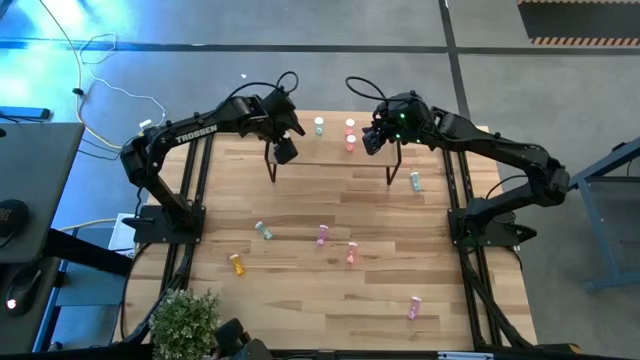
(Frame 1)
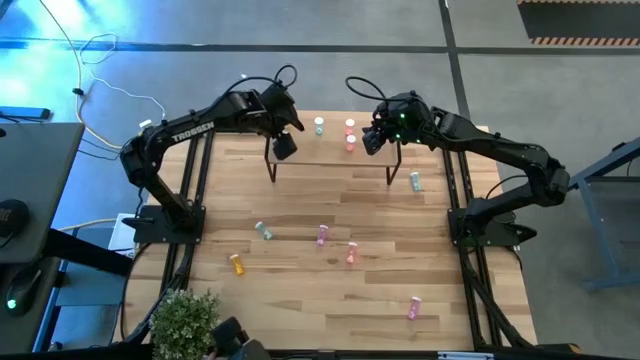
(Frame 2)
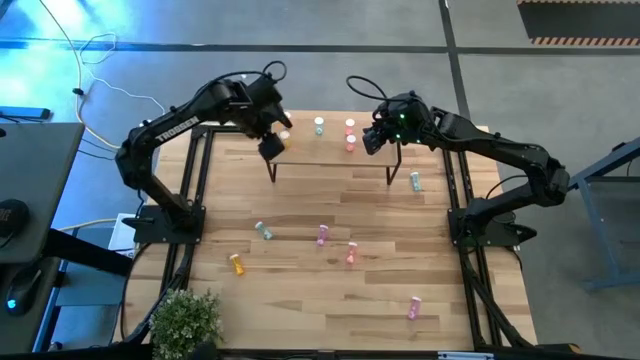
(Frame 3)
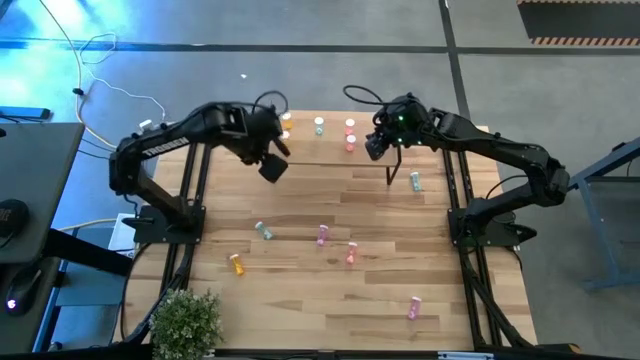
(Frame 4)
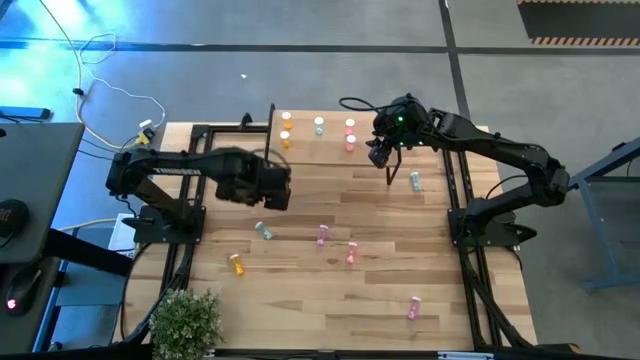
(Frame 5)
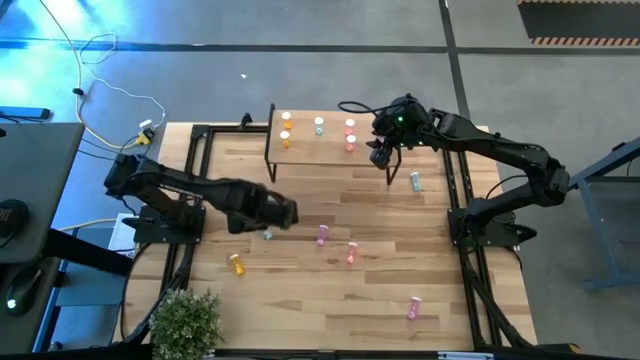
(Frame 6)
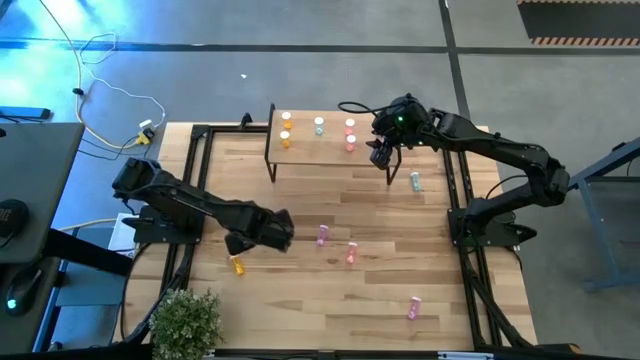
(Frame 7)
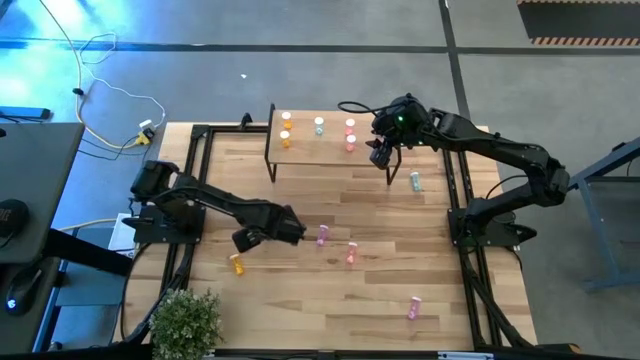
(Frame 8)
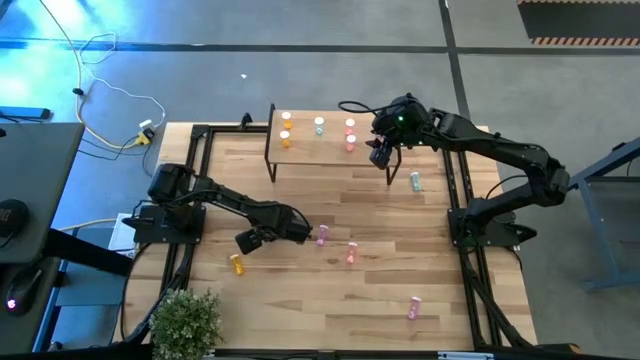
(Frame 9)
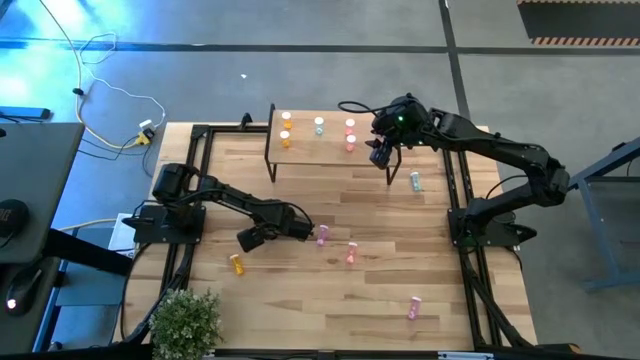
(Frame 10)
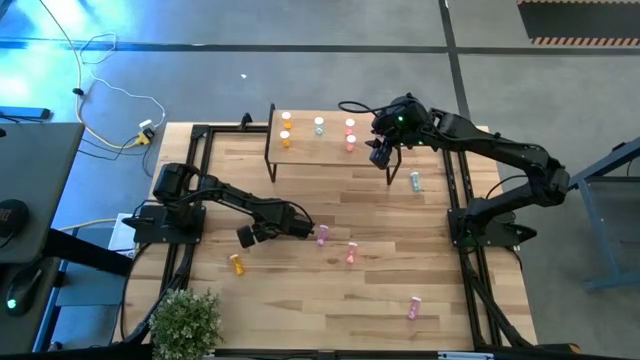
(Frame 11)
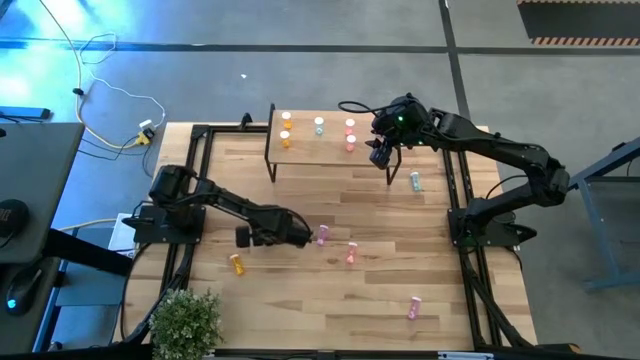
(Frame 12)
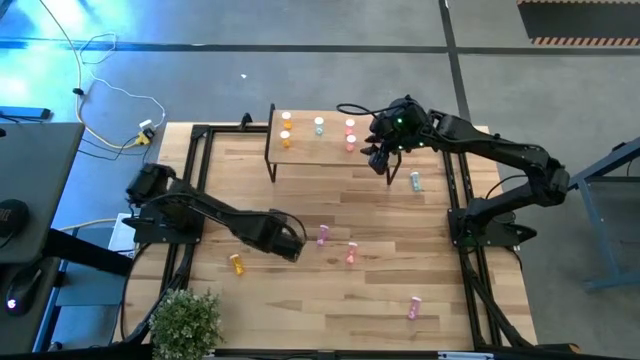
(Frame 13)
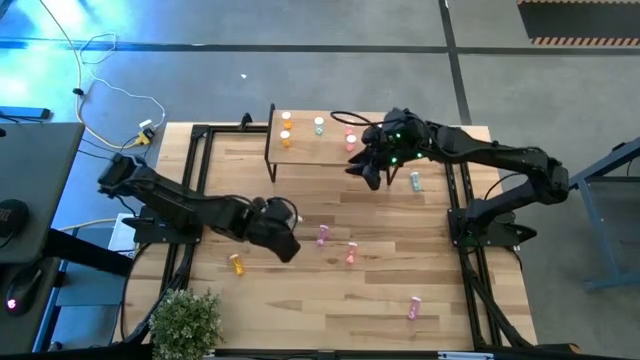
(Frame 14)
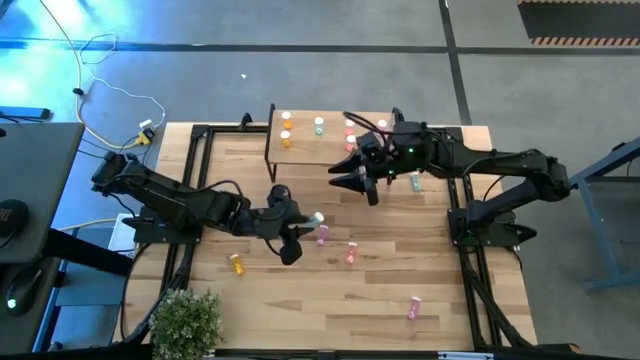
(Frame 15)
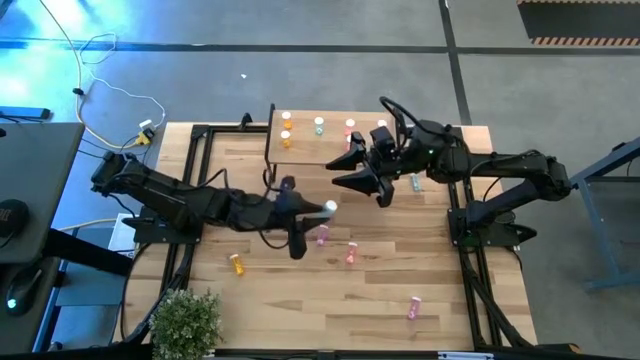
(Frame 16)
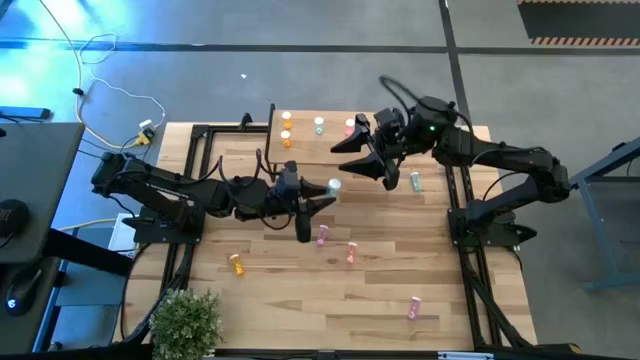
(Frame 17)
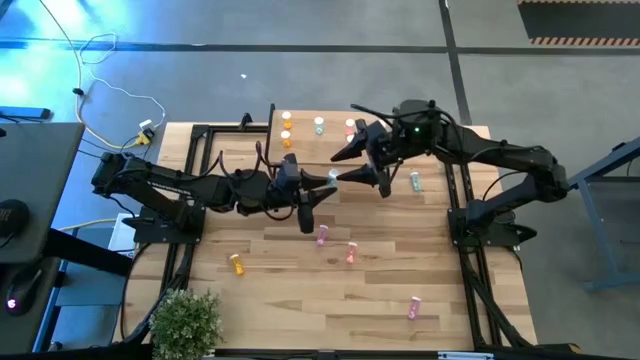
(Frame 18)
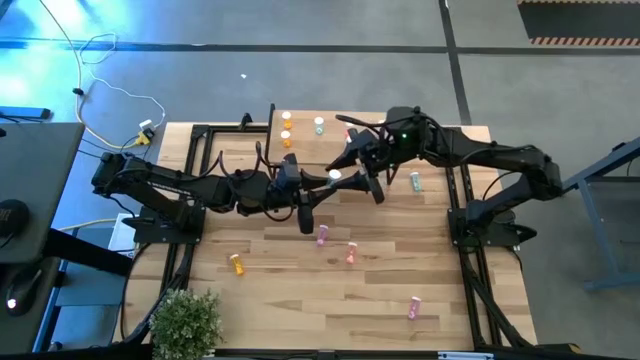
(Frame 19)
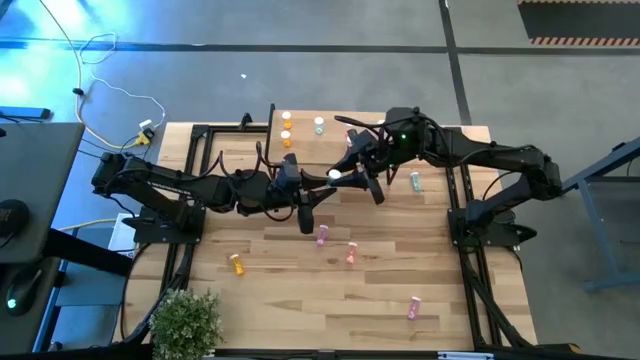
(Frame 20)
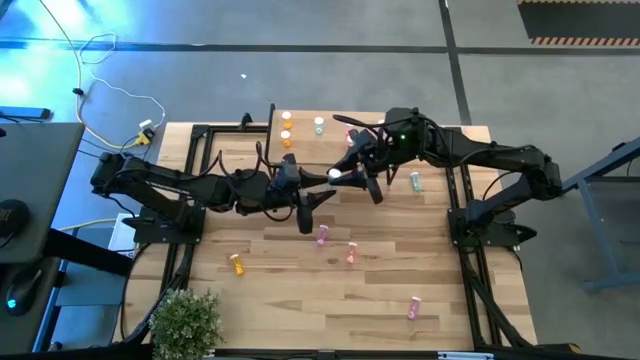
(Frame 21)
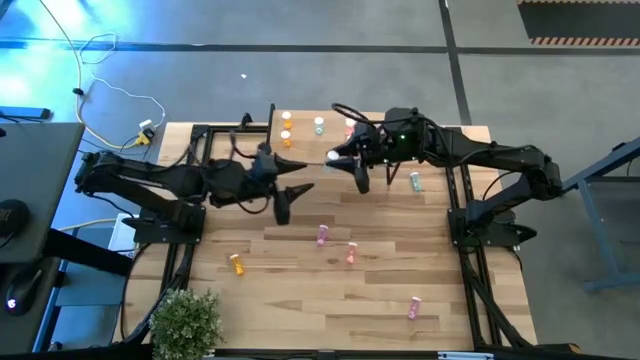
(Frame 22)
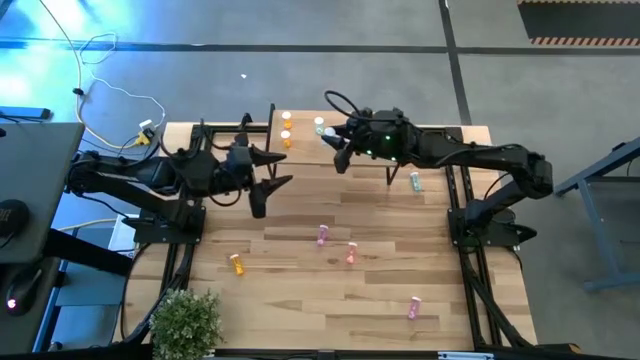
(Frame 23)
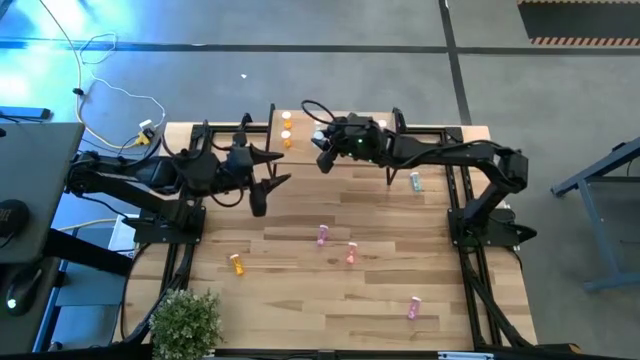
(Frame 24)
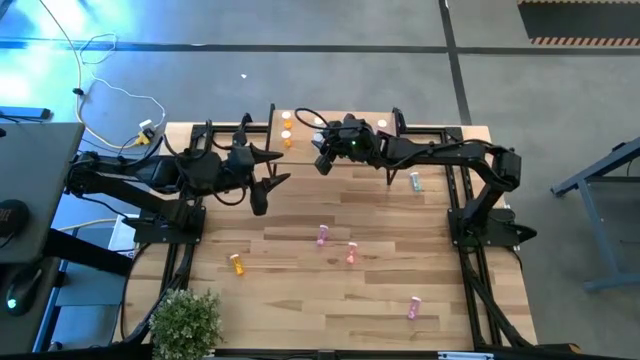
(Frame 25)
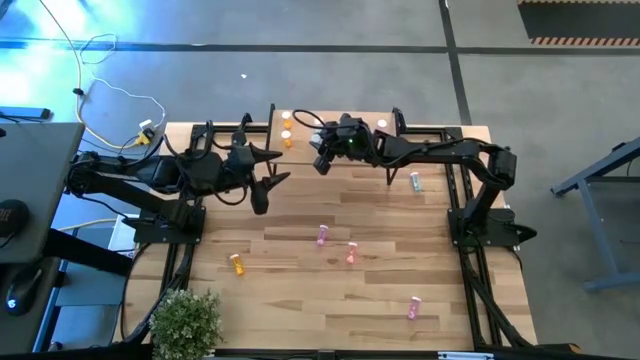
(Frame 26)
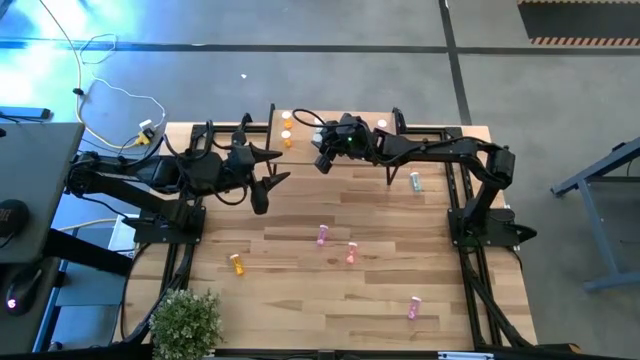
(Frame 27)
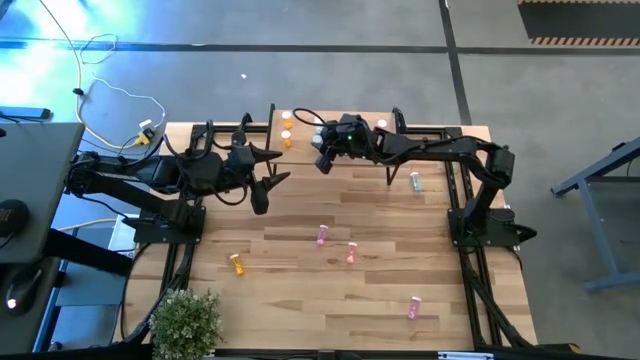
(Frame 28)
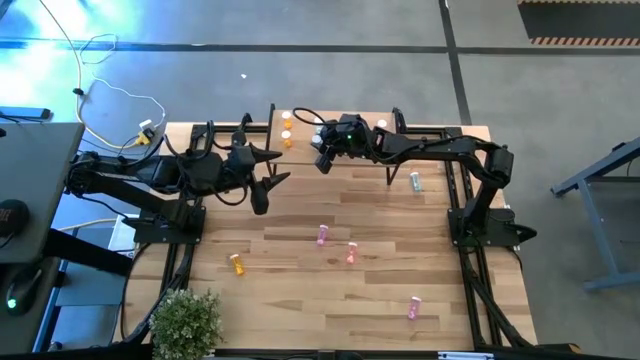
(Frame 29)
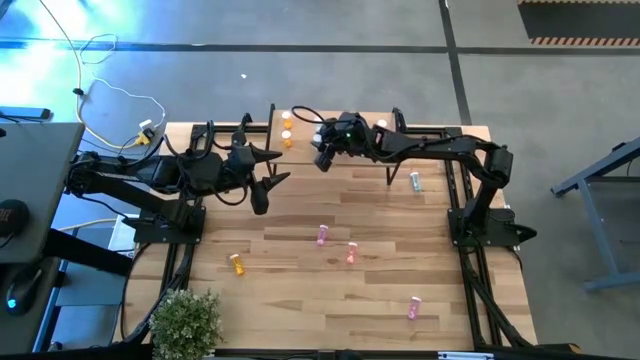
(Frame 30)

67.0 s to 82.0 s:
Task: Pick and place medicine bottles onto shelf by color
Put the left green pill bottle on the shelf aligned with the green pill bottle

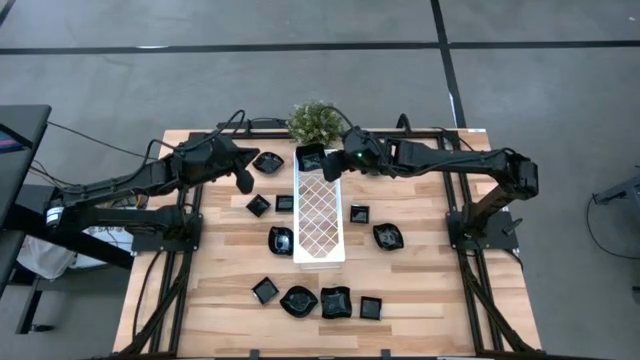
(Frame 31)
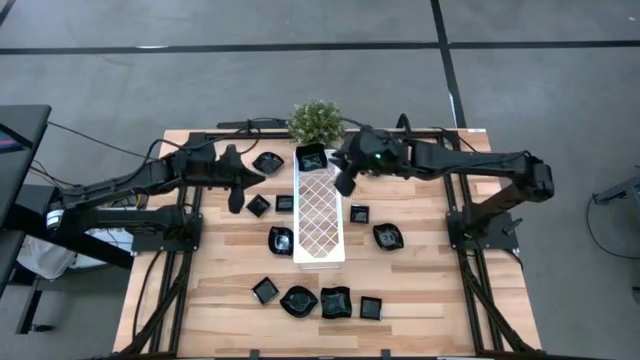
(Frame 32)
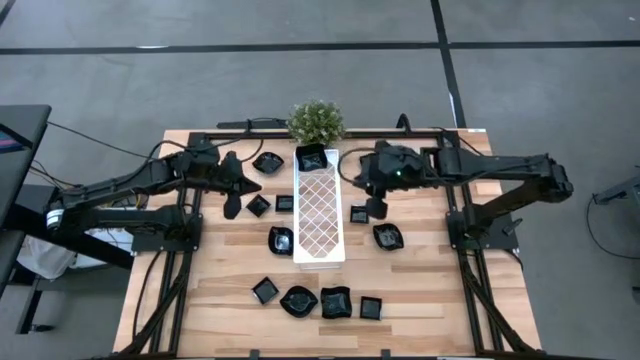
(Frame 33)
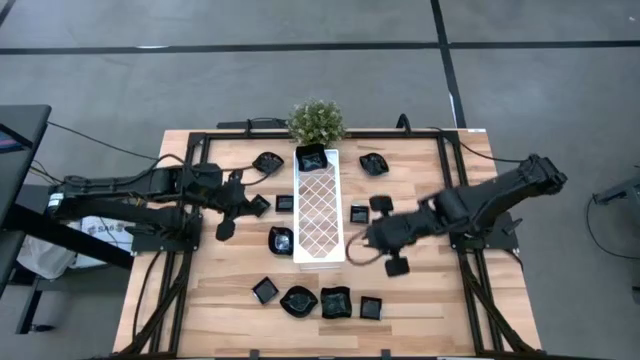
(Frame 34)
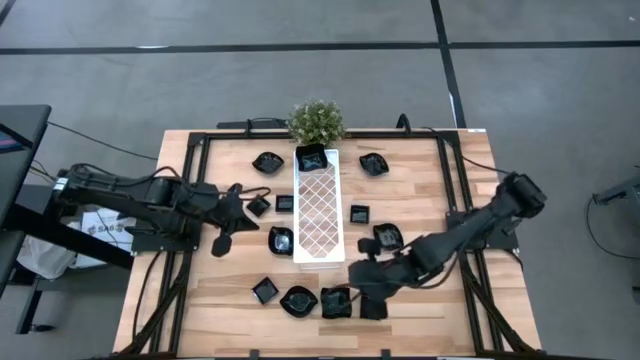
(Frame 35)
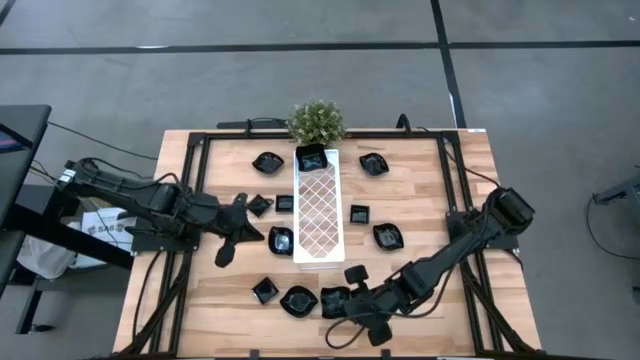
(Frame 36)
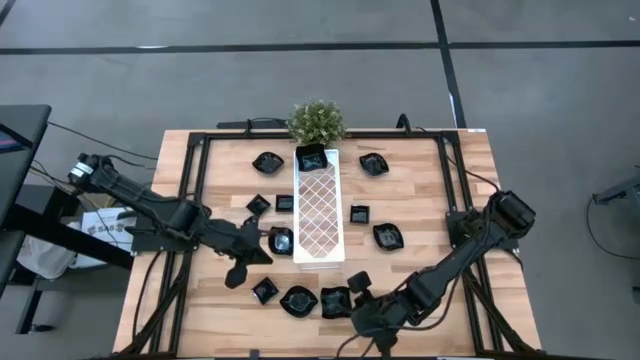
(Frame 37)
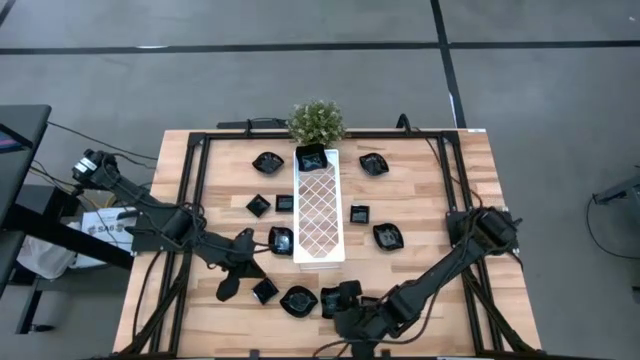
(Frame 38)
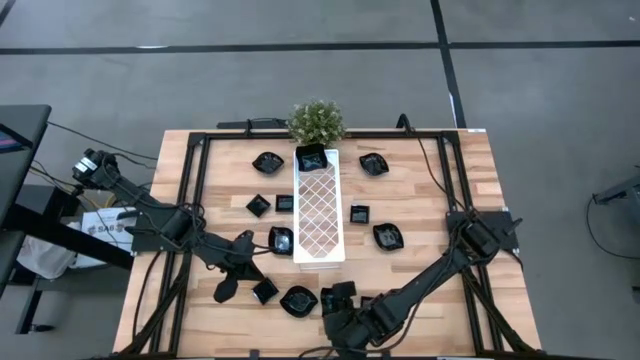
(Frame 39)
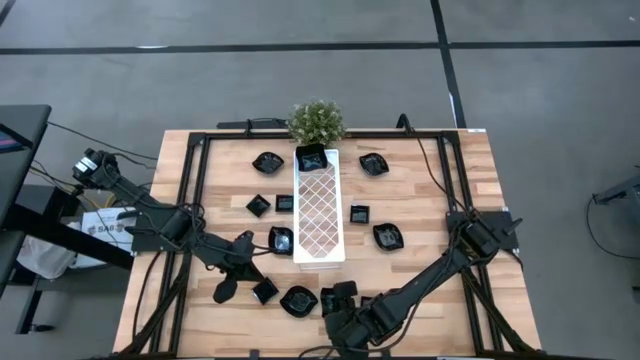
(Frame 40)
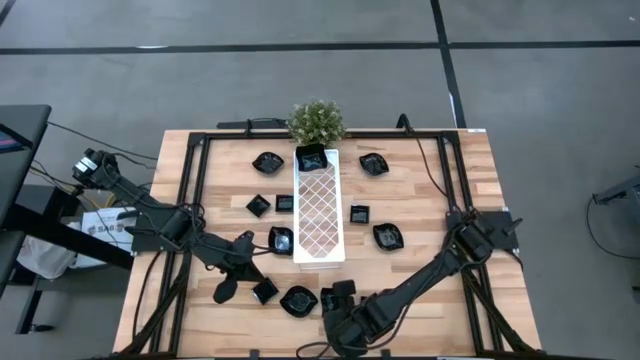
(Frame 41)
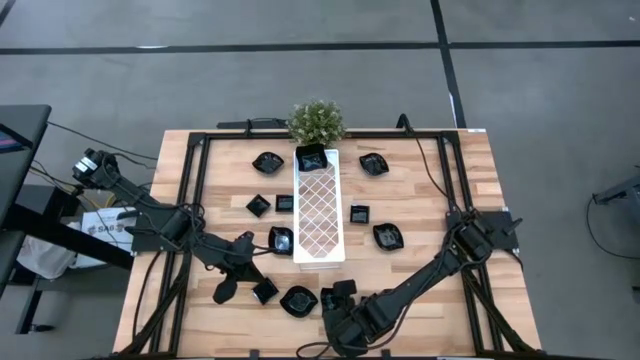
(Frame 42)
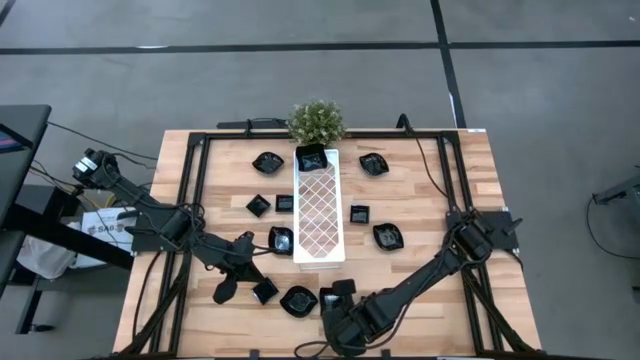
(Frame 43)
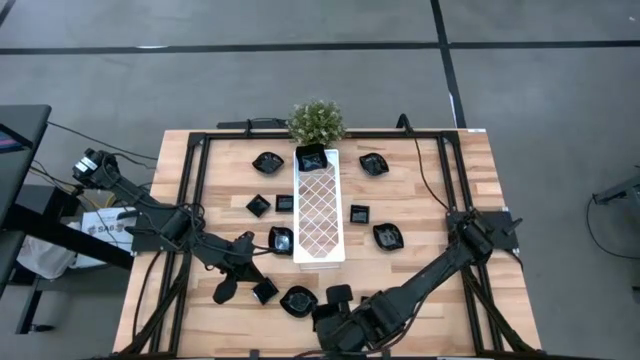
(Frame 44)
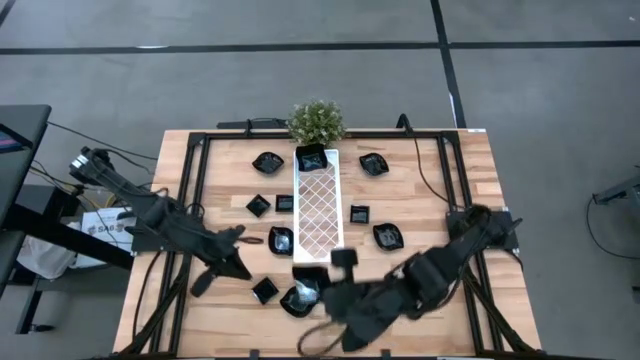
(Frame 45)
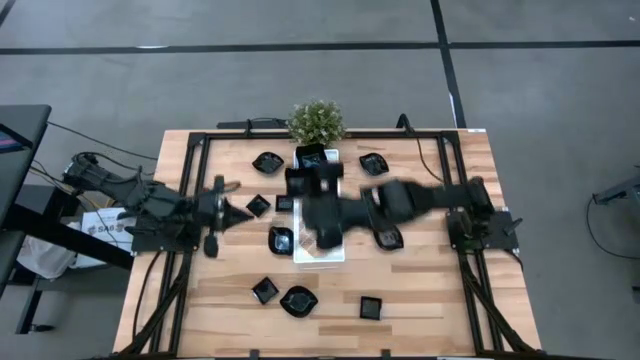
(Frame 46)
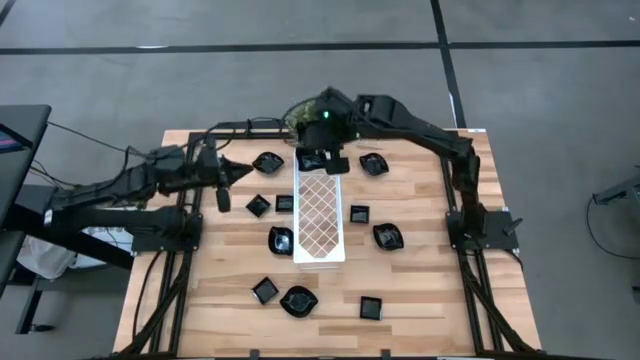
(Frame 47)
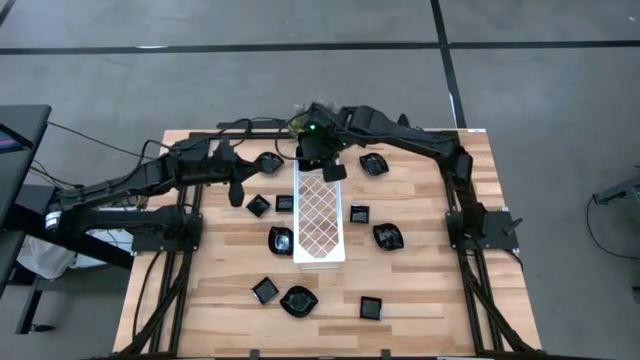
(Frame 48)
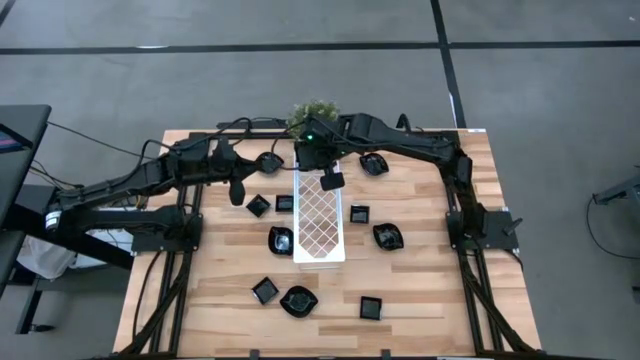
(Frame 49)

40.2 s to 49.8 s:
Task: Pick & Place Mini shaped plates
Stack the distorted square plate on the other distorted square plate on the shelf
